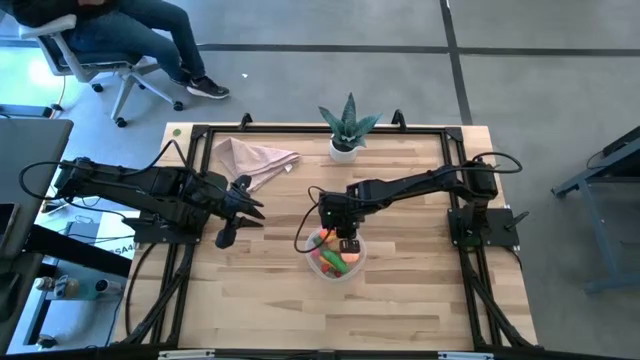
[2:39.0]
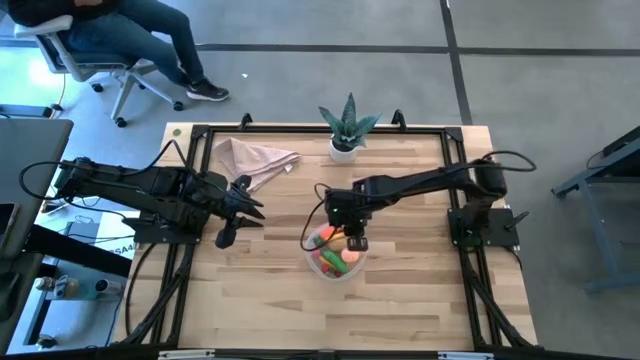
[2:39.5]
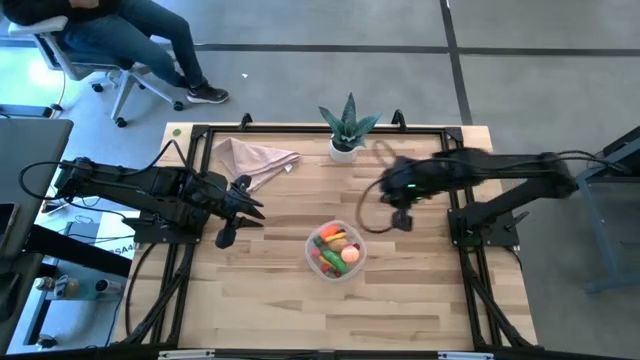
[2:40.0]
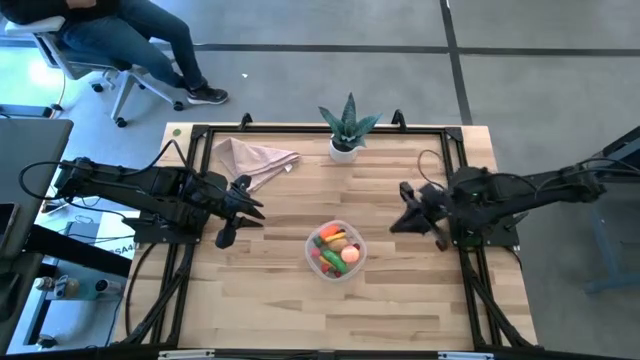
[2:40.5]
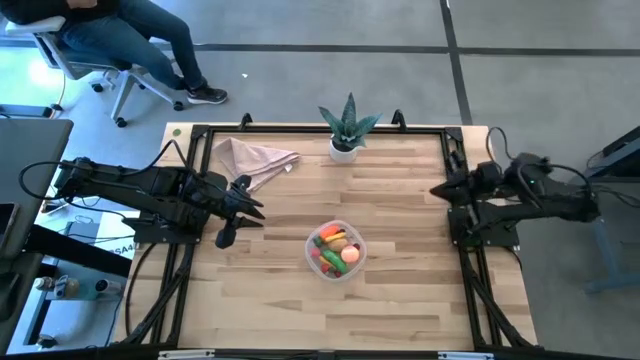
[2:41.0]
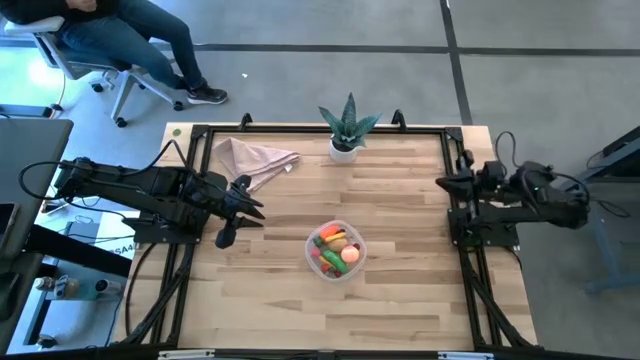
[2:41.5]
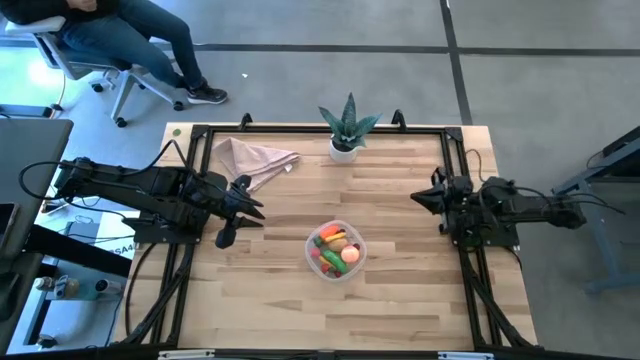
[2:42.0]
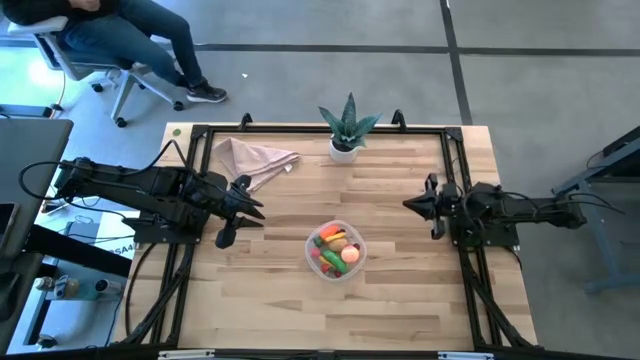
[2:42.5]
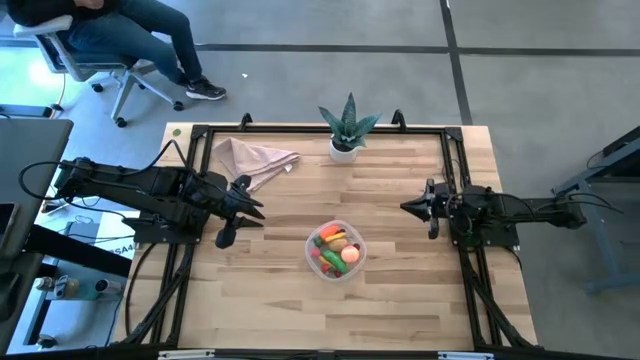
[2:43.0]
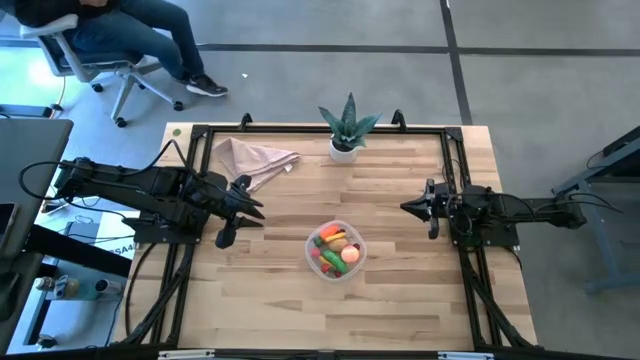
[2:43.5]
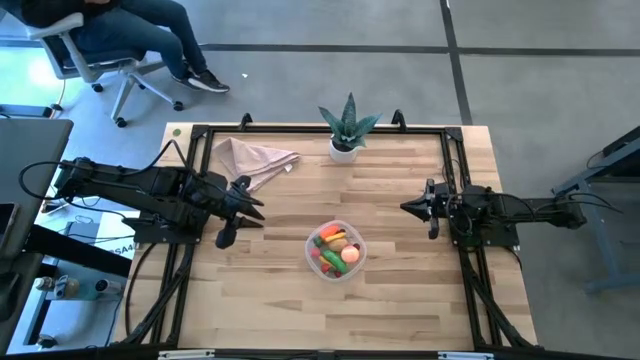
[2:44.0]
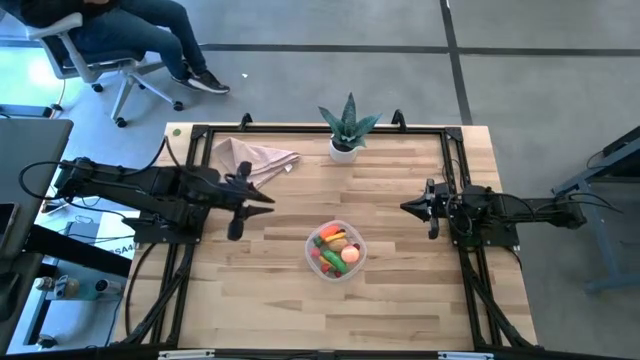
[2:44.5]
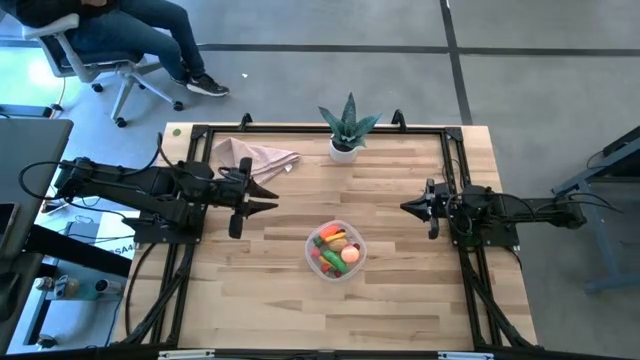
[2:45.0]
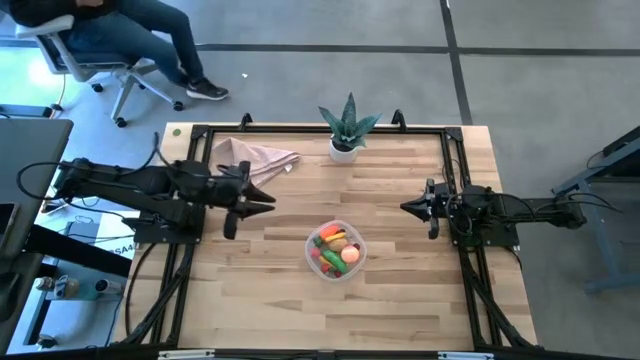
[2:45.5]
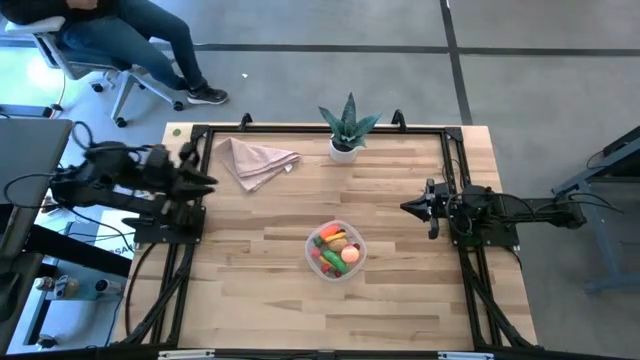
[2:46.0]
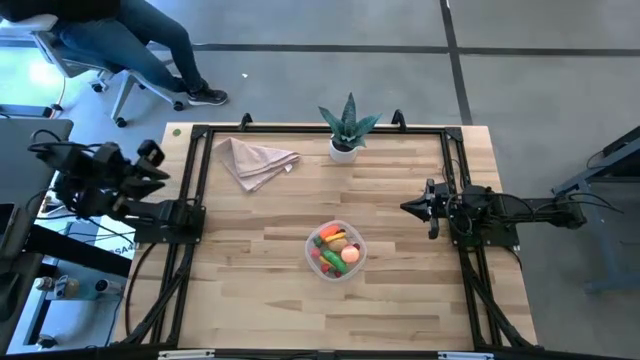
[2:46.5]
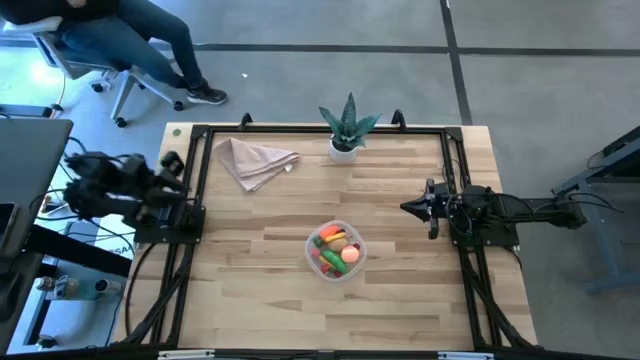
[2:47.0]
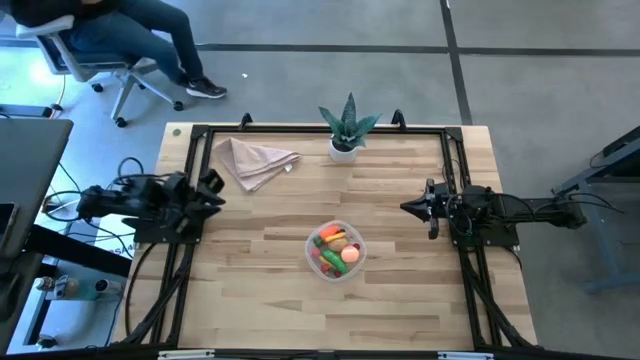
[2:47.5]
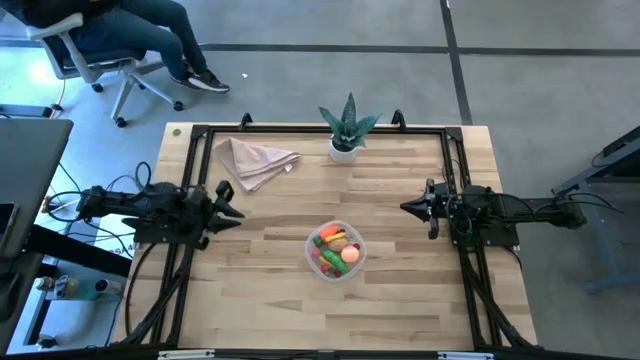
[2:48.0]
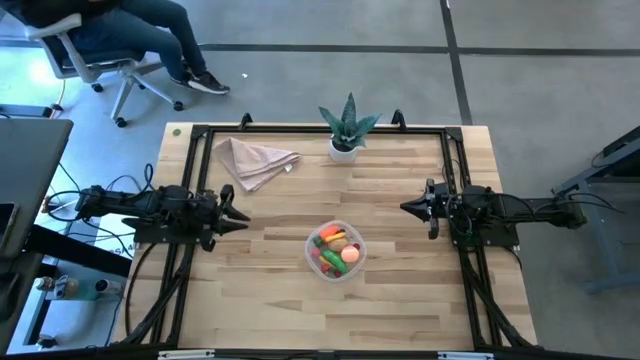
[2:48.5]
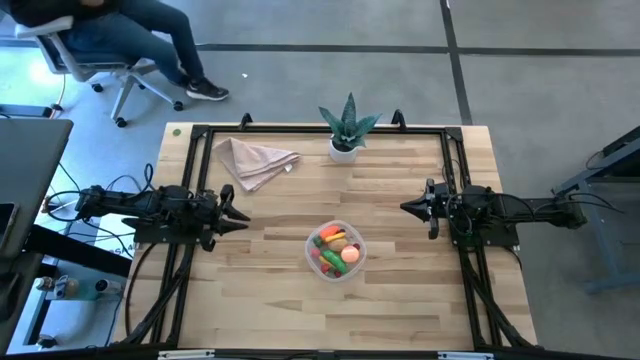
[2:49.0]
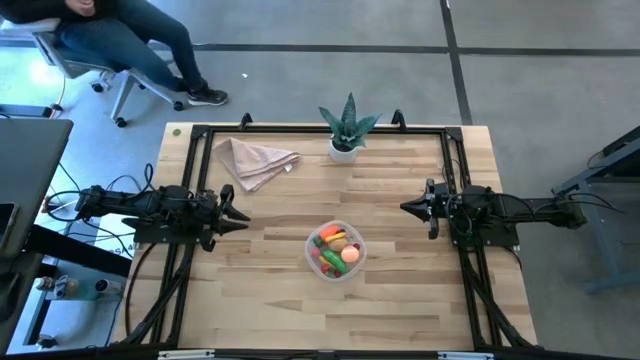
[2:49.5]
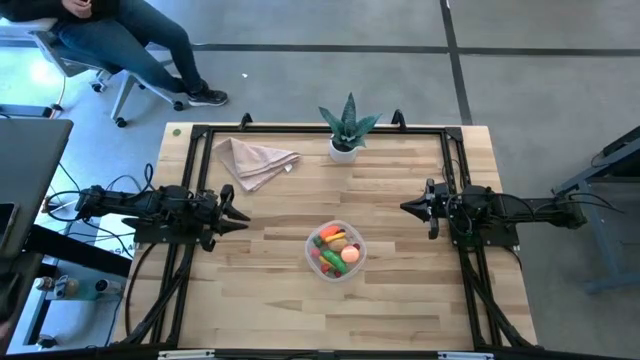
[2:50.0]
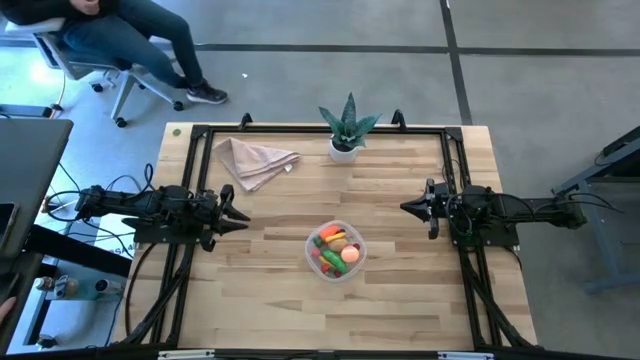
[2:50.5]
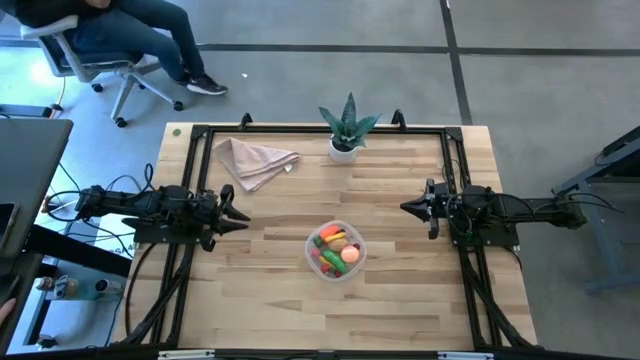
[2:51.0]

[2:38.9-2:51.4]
Task: Pick and placing Produce into tupperware
Return to Home Position

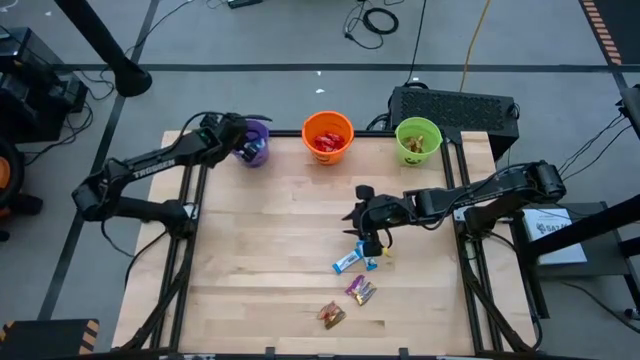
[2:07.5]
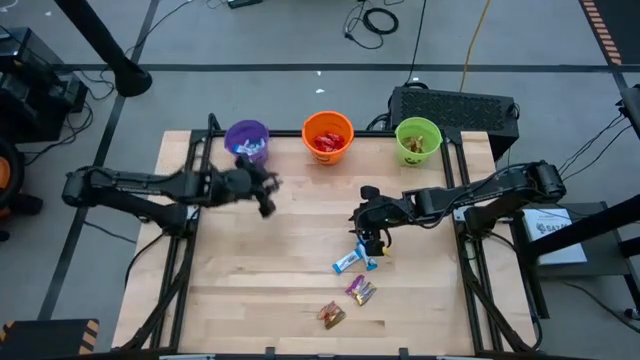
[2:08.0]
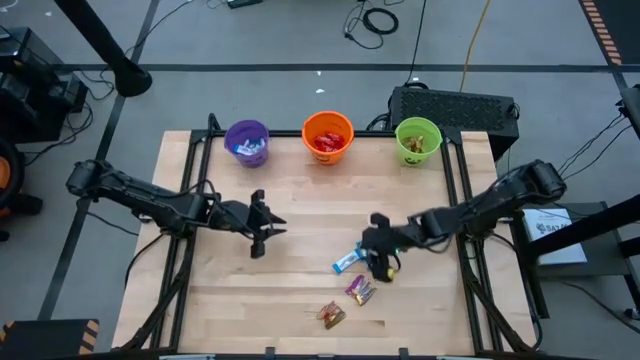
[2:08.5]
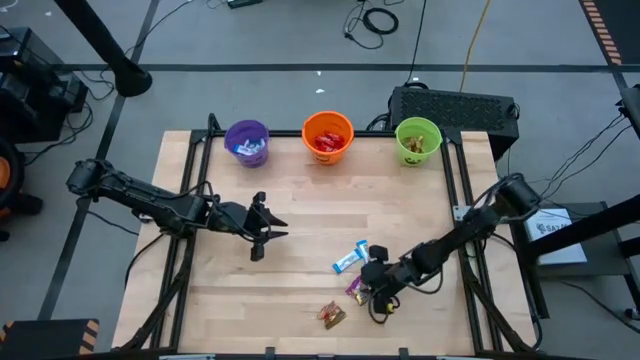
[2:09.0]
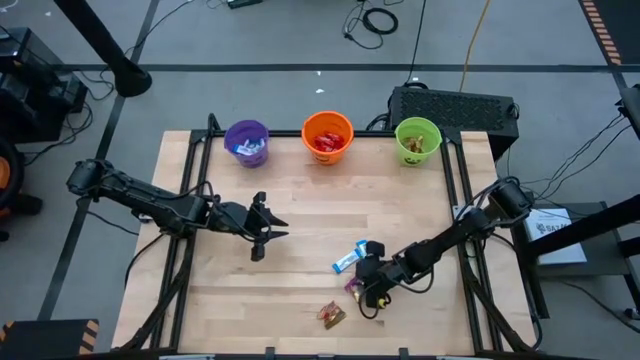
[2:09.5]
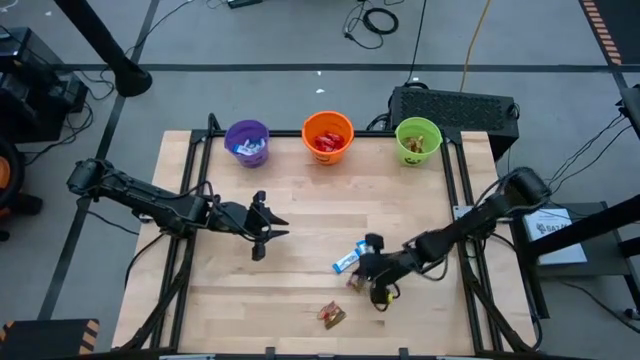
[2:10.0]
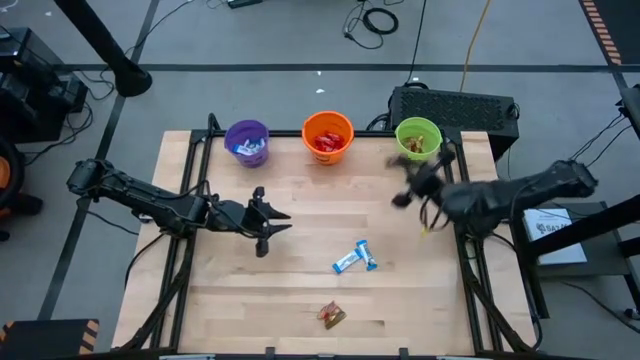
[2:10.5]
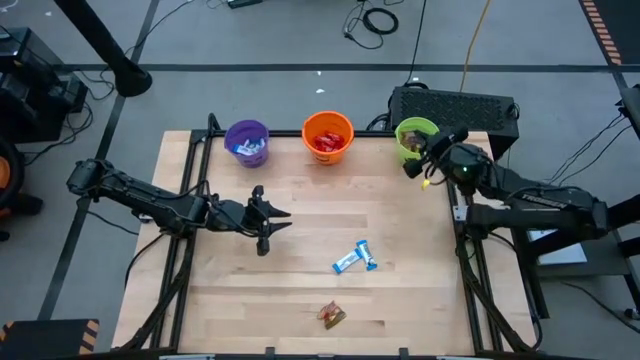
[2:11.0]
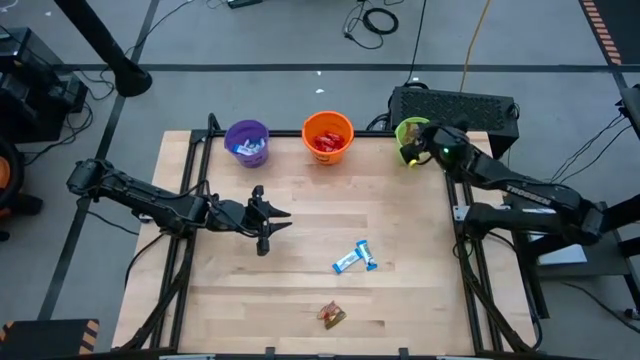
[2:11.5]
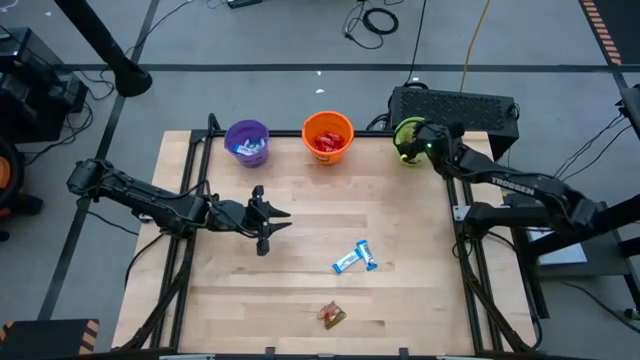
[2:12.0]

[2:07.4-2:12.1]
Task: Sort candy by brand, put in halloween buckets
Put the brown gummy into the green bucket

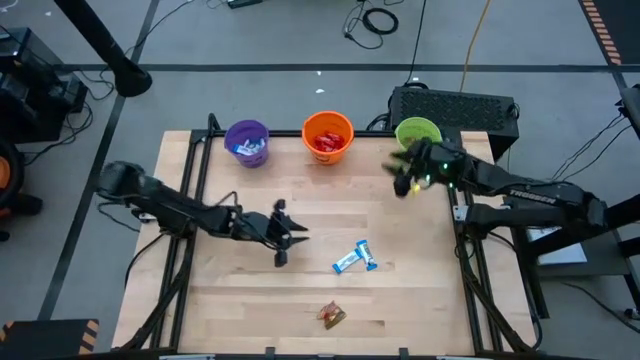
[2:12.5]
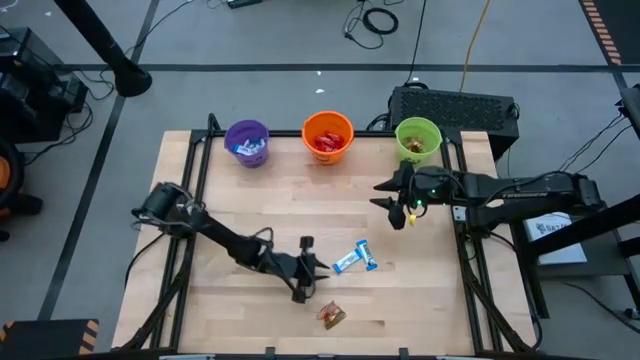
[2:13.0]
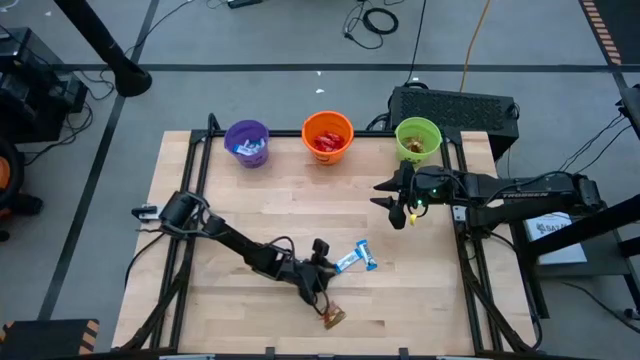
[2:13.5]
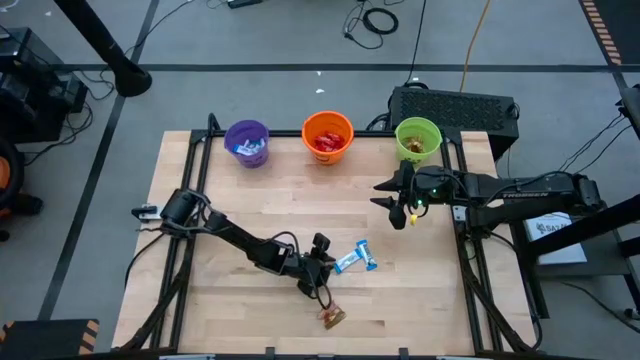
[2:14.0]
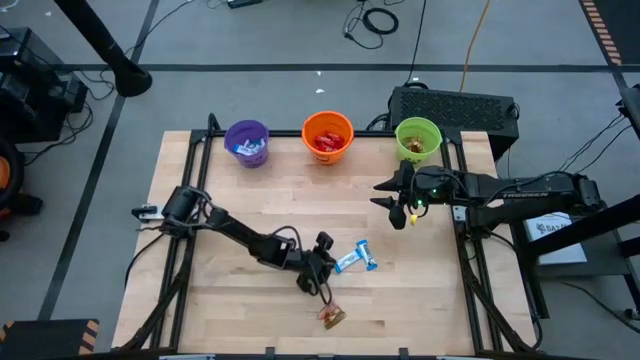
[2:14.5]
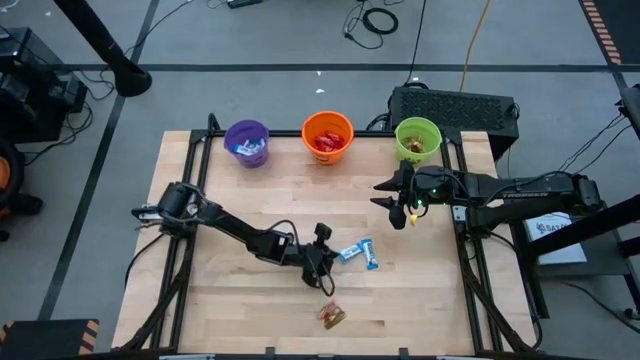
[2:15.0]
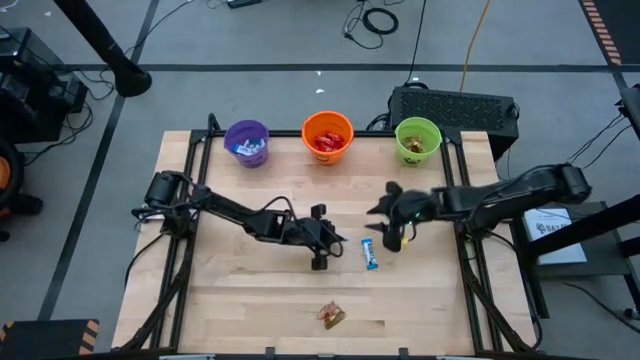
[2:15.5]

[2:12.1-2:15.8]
Put the white chocolate into the purple bucket
